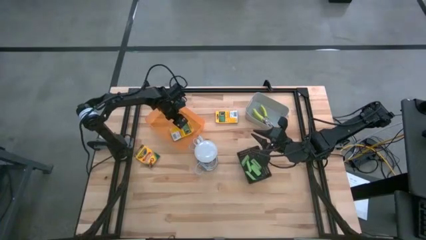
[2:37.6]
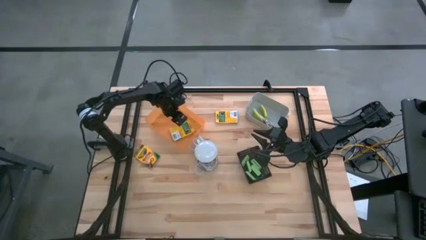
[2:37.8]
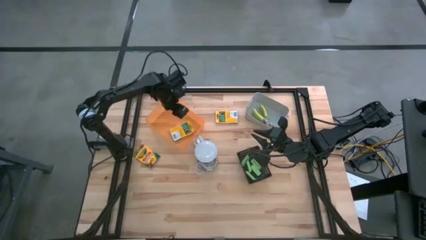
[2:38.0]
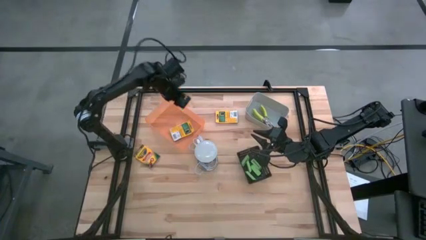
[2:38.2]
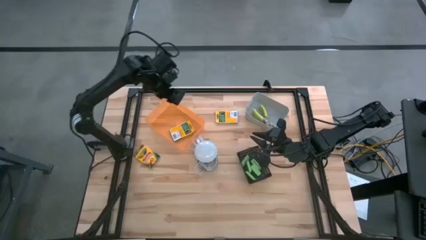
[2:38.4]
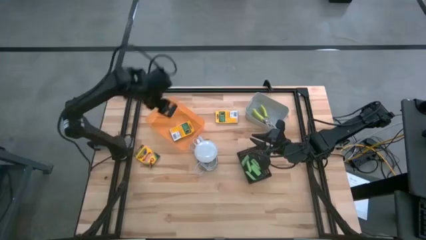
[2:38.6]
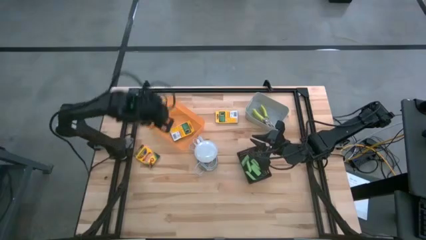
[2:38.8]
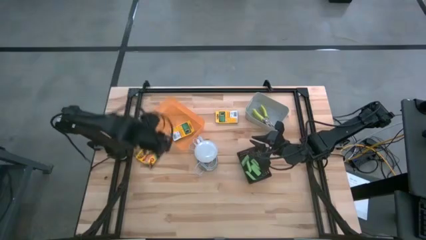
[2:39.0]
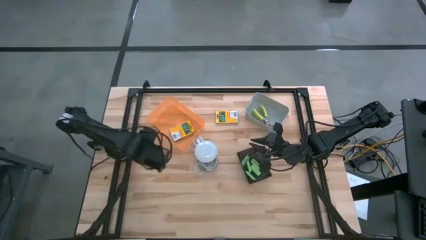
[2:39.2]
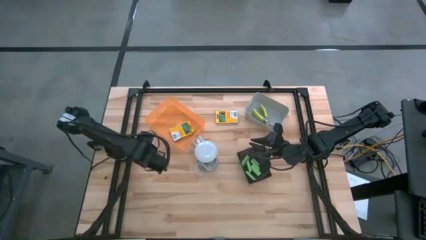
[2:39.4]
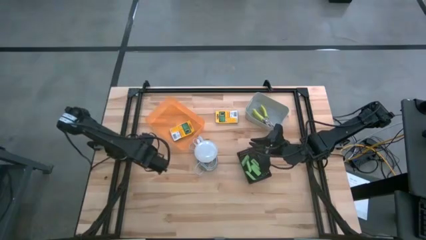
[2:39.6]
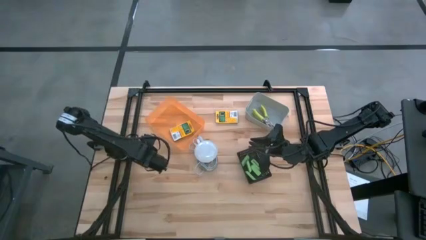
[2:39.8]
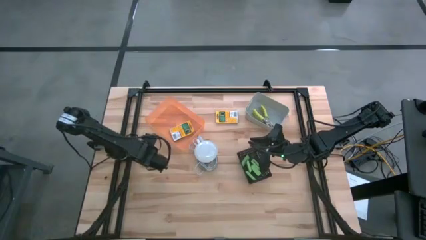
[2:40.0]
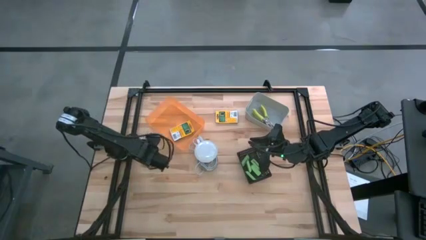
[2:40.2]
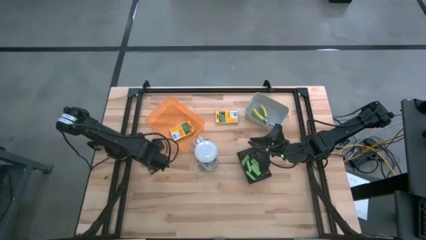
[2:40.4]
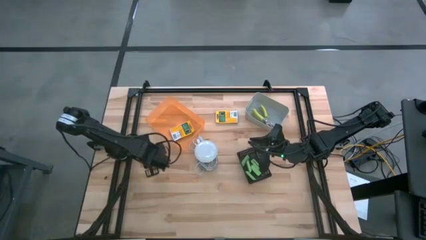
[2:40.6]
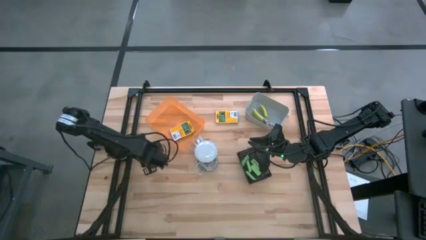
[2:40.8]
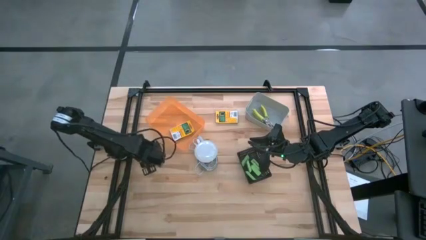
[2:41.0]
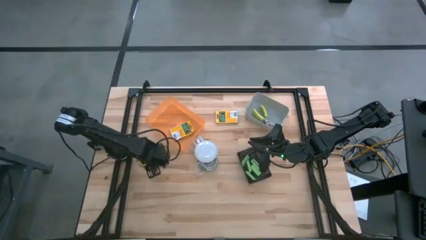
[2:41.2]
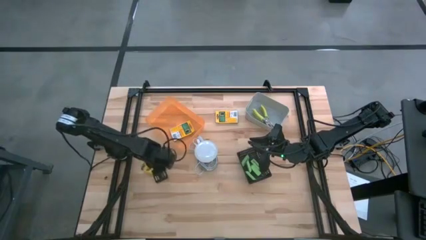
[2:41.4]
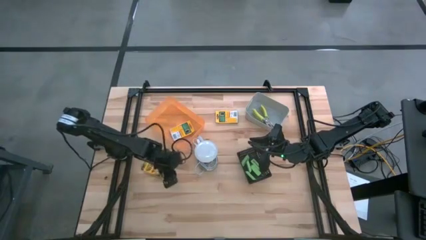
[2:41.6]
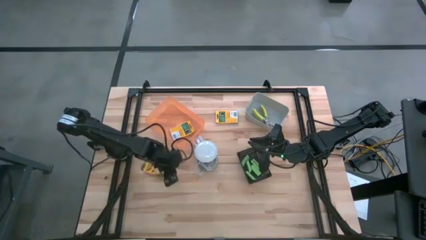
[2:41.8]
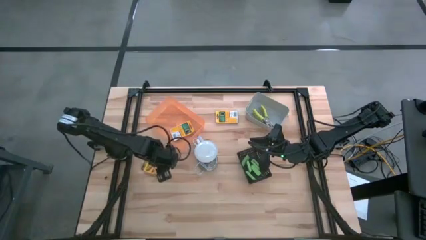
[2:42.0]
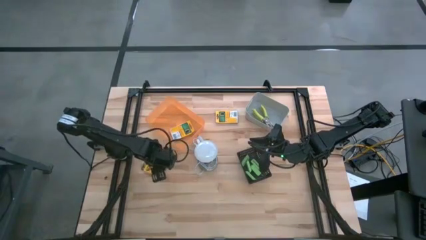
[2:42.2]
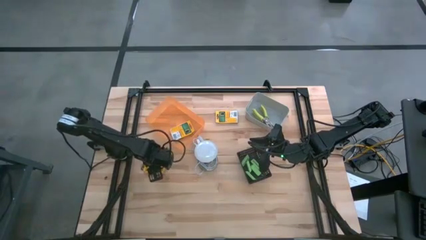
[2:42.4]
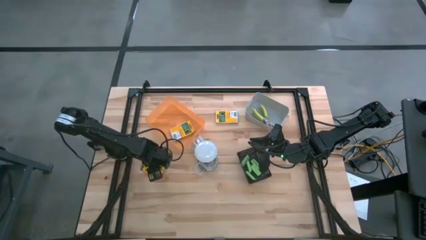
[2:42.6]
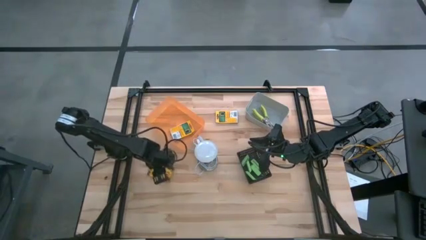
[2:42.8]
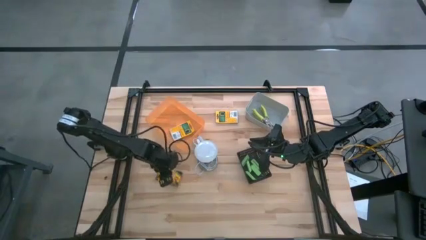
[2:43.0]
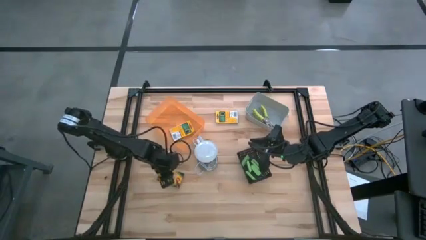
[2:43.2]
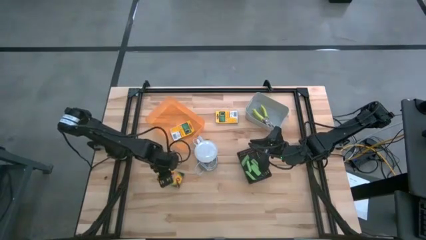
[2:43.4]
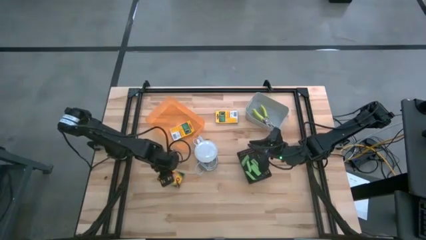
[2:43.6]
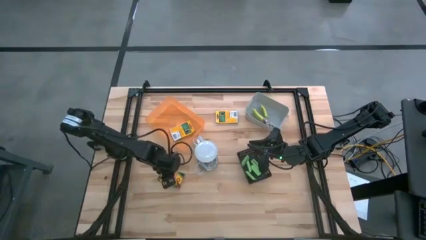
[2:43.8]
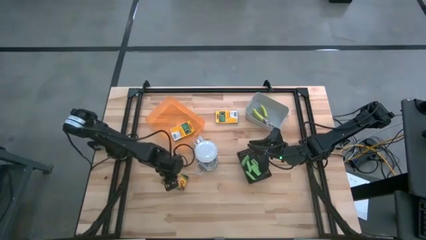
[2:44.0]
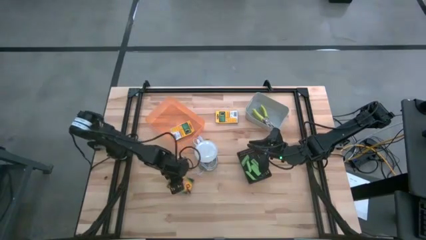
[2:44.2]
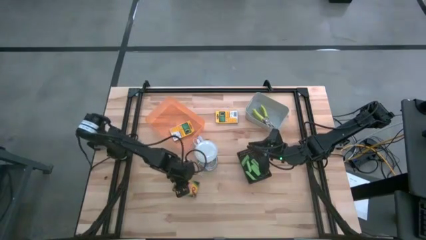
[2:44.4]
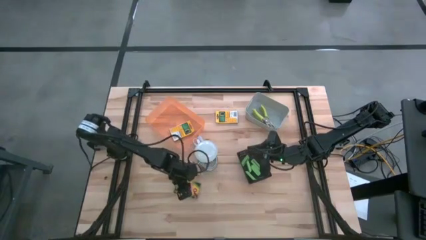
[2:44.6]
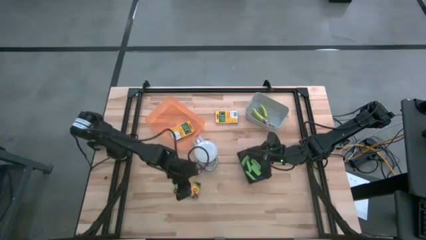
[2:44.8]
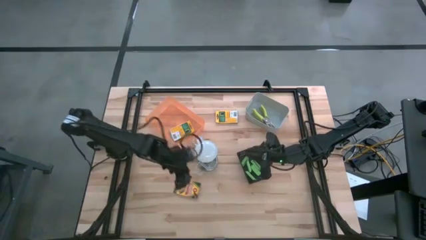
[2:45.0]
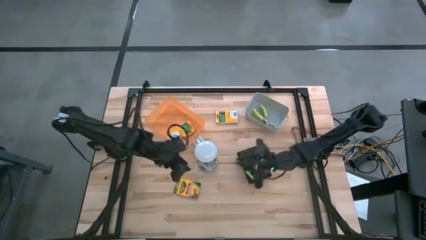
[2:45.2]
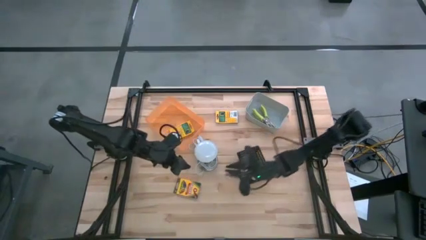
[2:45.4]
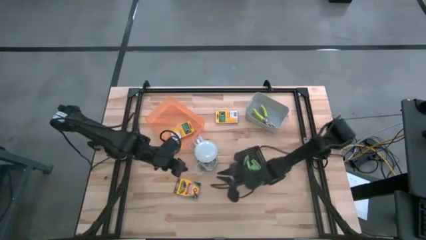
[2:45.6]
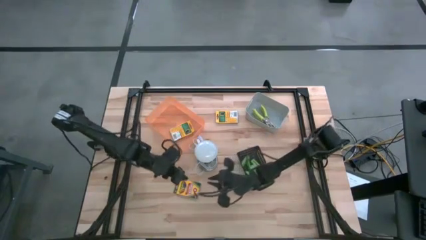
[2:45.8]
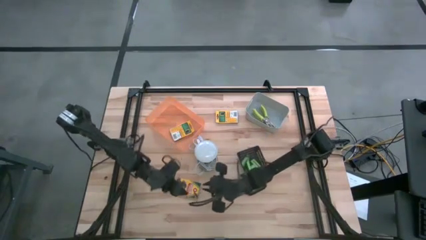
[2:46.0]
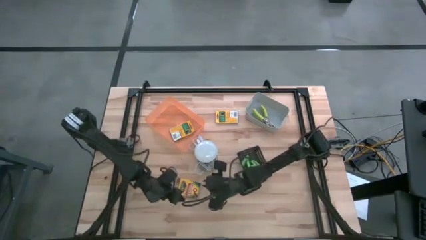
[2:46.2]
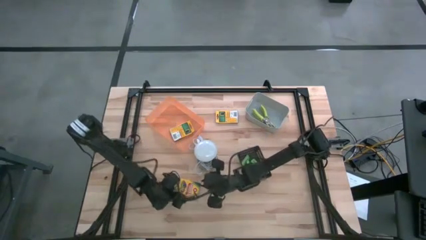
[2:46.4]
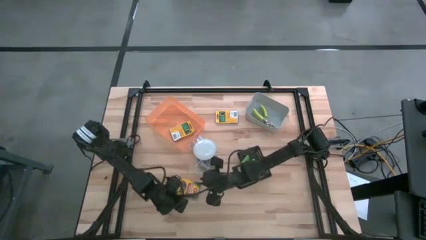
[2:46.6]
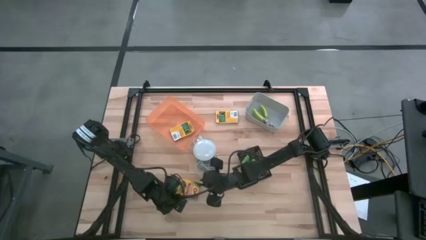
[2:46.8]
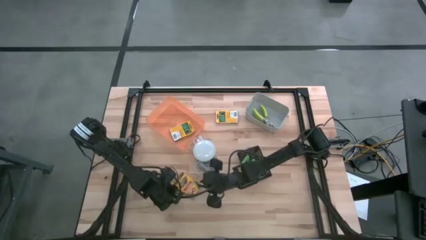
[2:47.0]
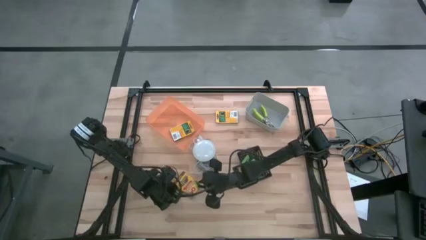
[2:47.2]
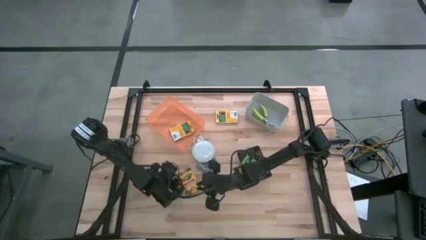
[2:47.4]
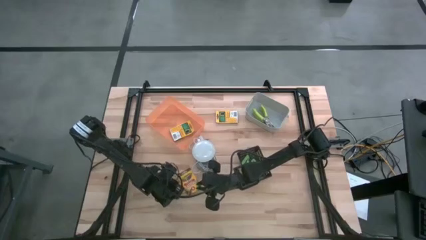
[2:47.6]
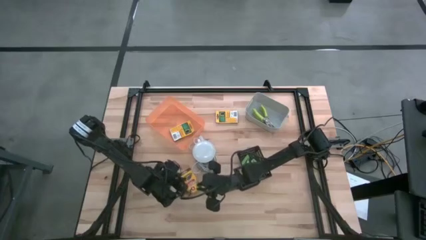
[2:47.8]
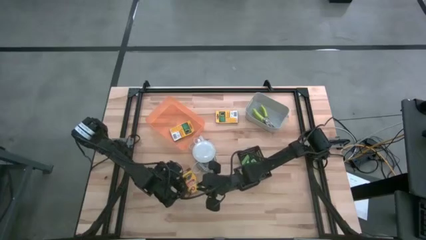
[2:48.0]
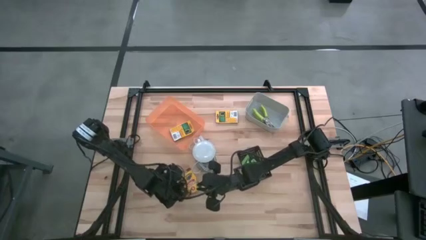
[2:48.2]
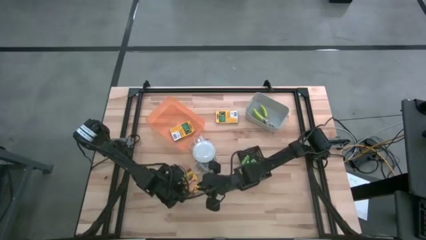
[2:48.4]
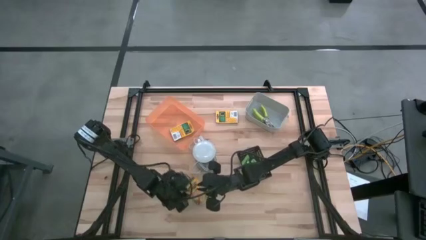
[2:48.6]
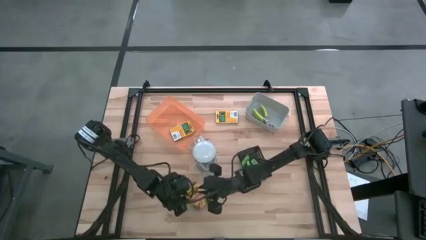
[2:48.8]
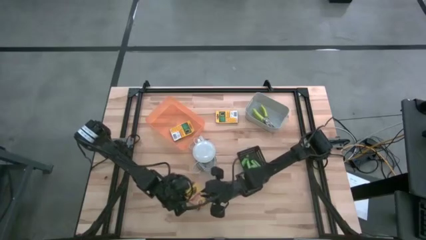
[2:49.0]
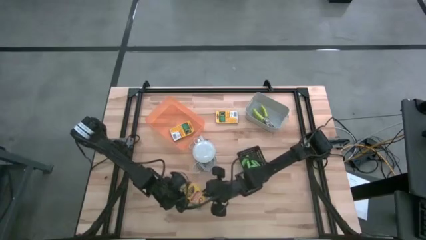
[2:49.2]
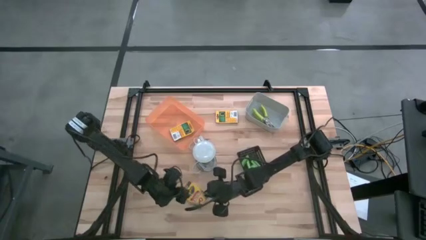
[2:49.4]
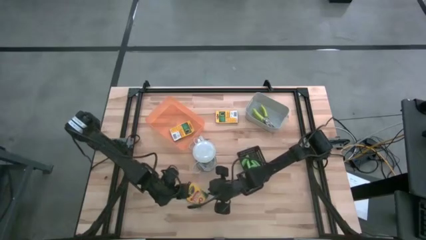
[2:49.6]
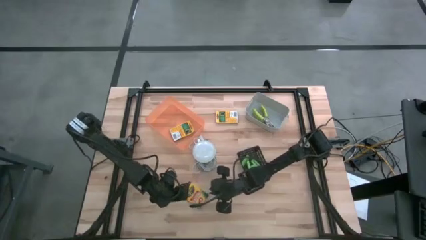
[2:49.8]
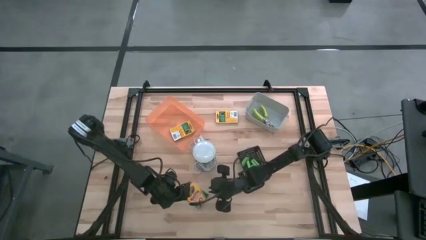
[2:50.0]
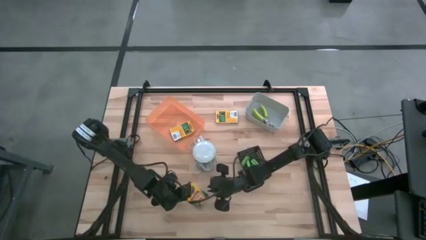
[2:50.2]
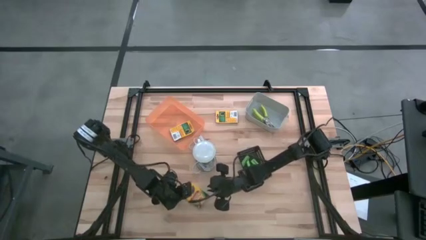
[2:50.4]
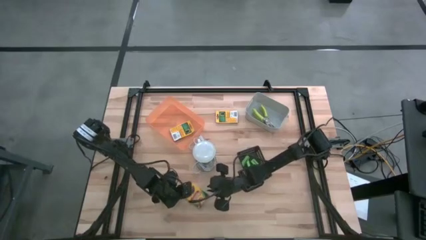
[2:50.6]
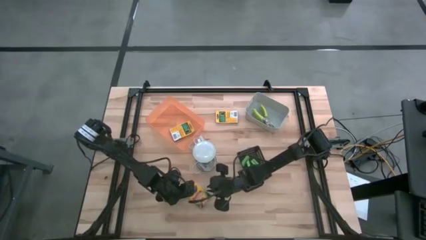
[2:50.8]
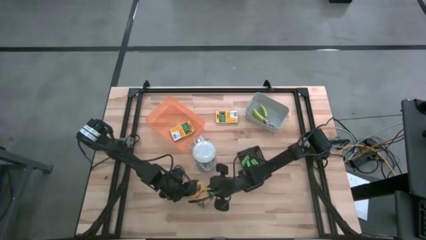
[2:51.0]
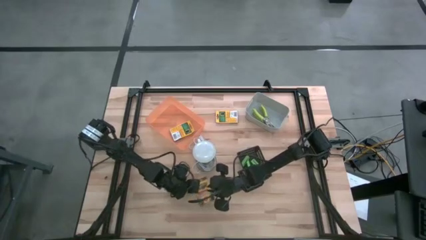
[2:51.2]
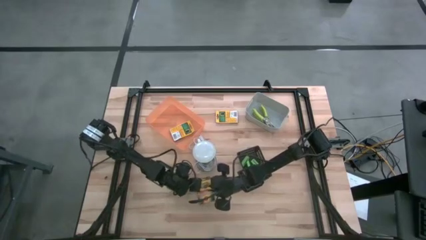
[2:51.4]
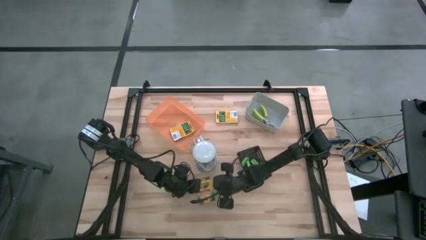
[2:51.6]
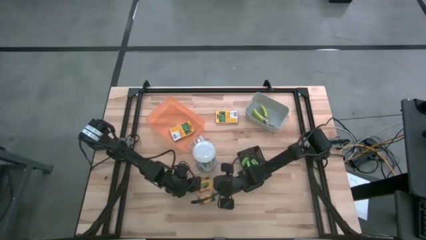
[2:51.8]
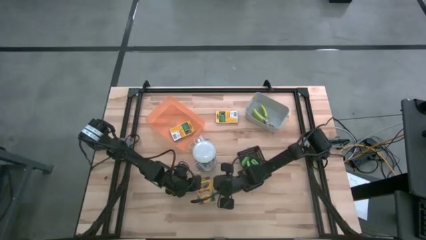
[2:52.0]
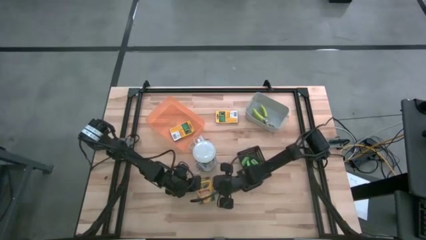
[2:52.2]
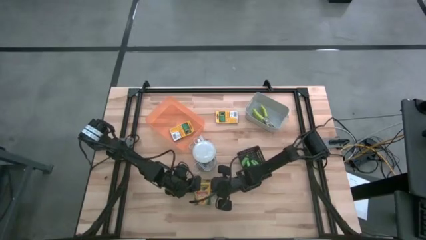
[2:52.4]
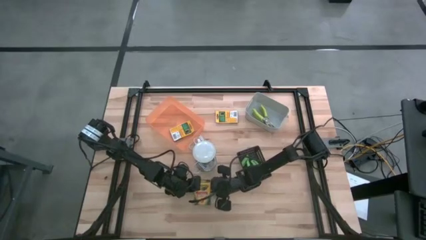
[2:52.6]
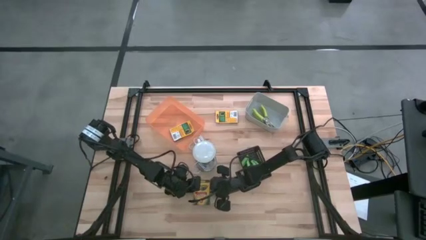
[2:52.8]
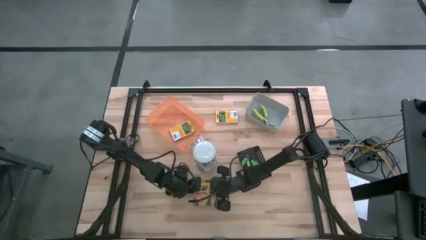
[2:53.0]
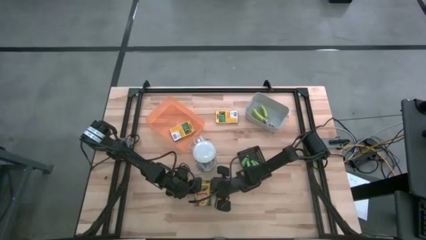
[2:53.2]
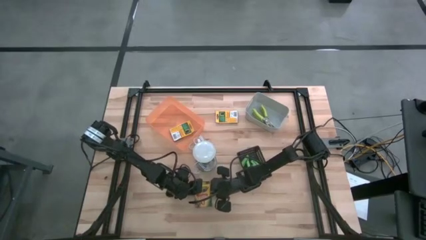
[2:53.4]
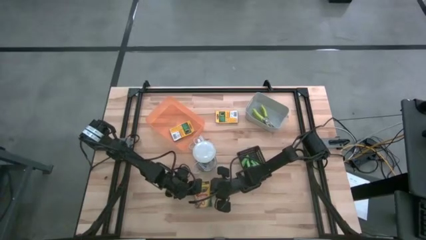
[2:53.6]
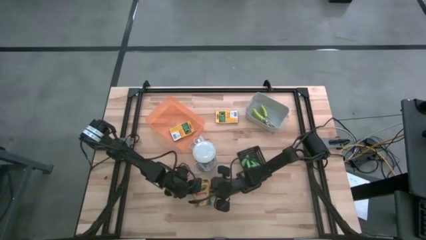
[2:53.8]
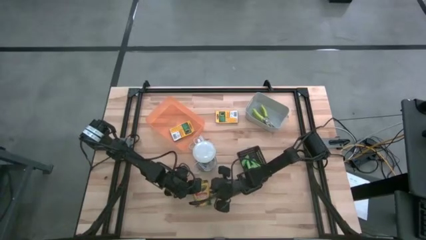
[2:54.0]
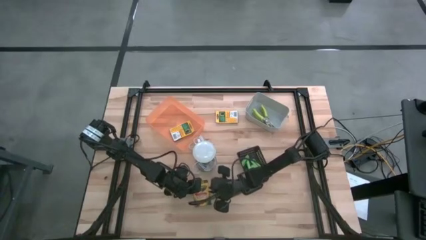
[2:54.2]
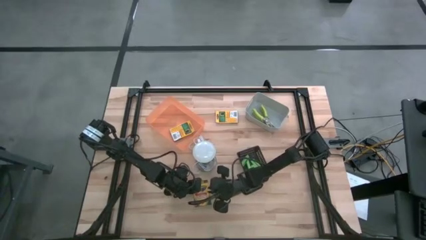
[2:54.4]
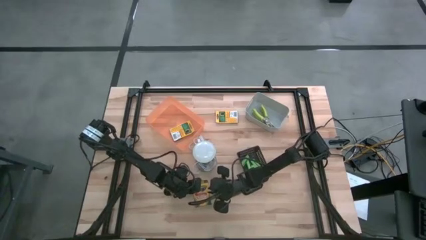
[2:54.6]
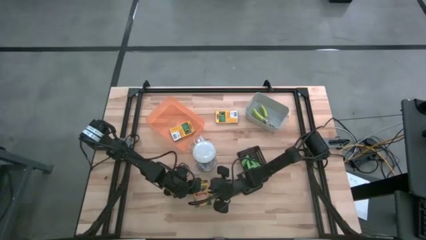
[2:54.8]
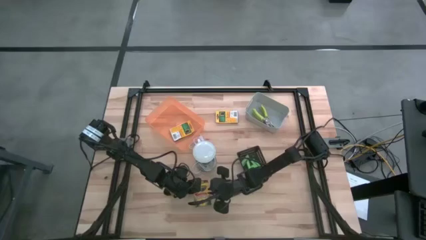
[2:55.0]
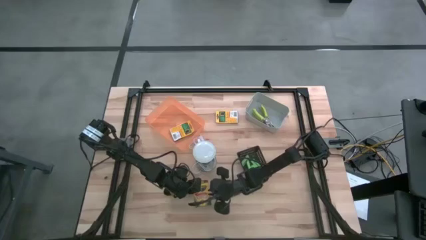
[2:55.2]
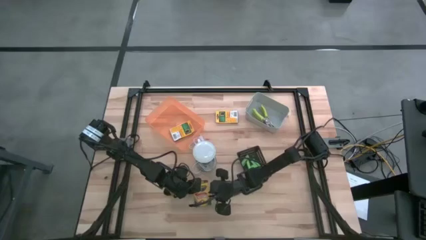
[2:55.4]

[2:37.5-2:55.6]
Task: Pick & Place School Supplies
Put the box of crayon into the orange bin
